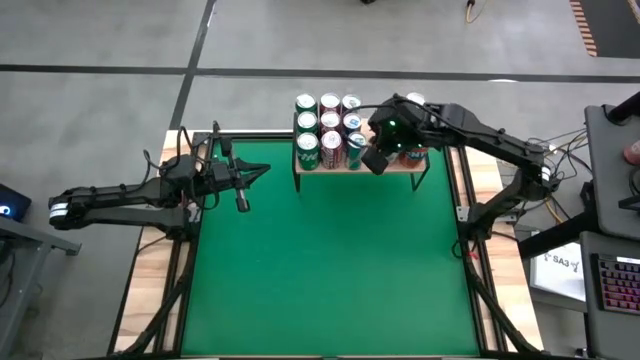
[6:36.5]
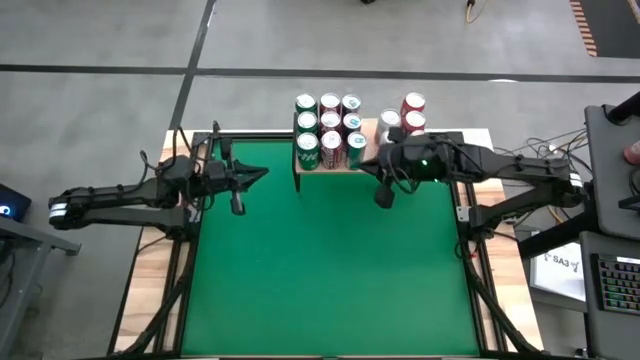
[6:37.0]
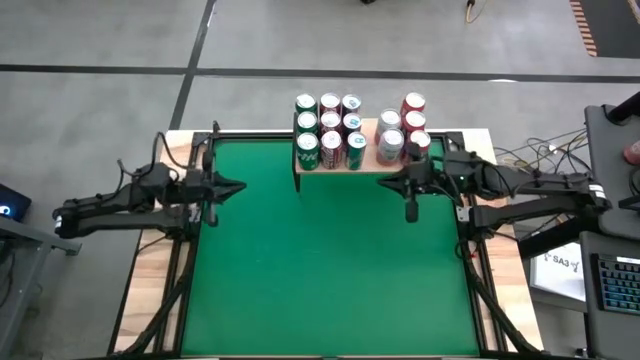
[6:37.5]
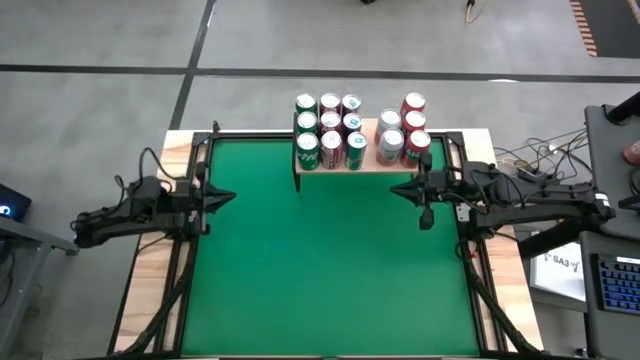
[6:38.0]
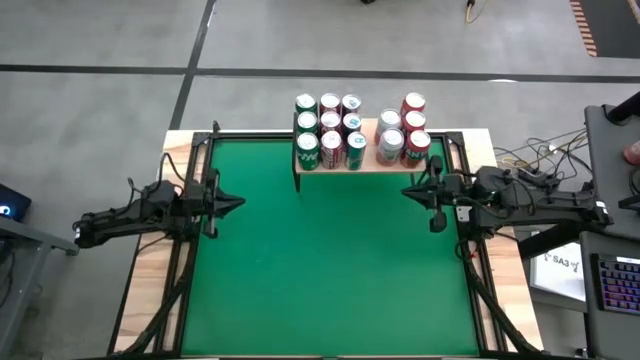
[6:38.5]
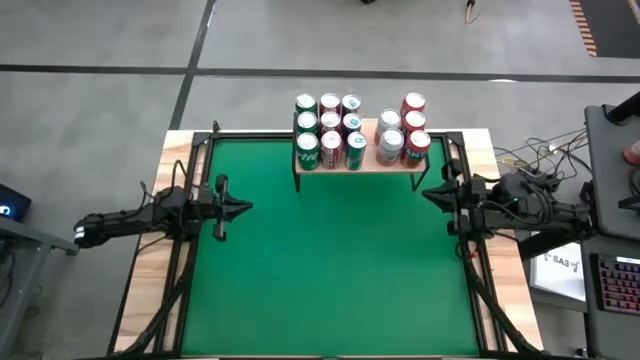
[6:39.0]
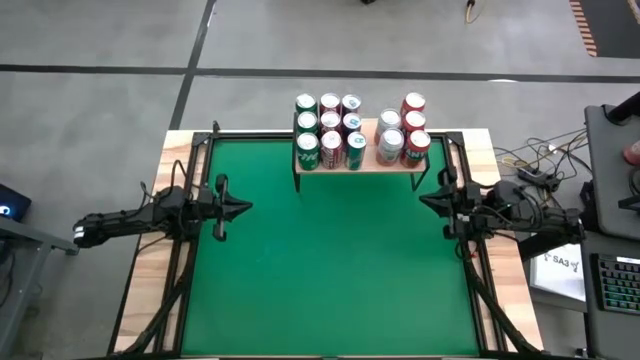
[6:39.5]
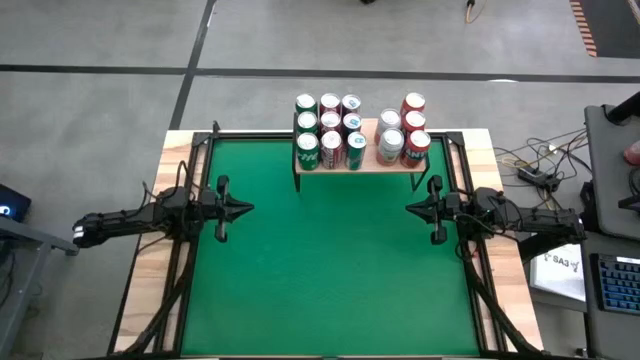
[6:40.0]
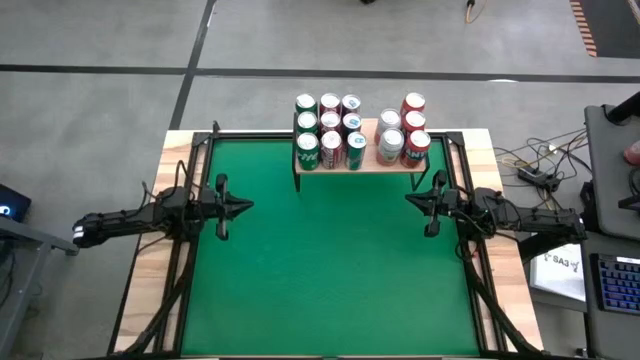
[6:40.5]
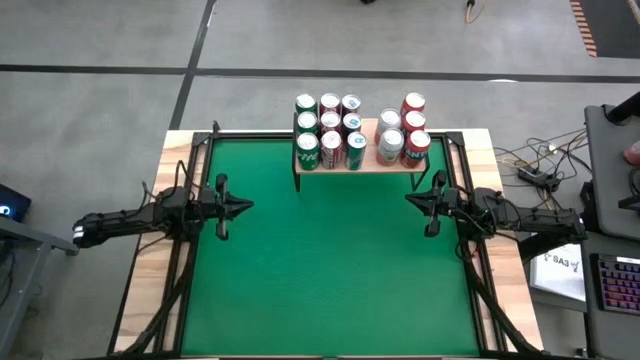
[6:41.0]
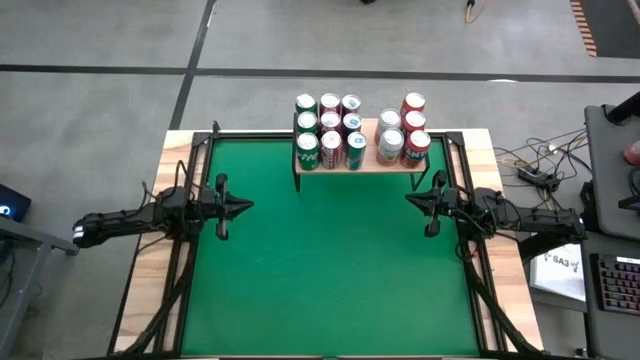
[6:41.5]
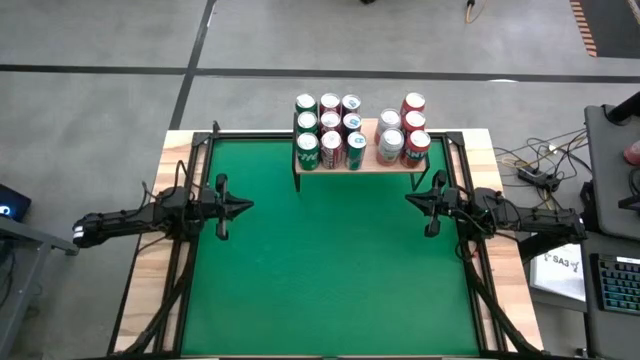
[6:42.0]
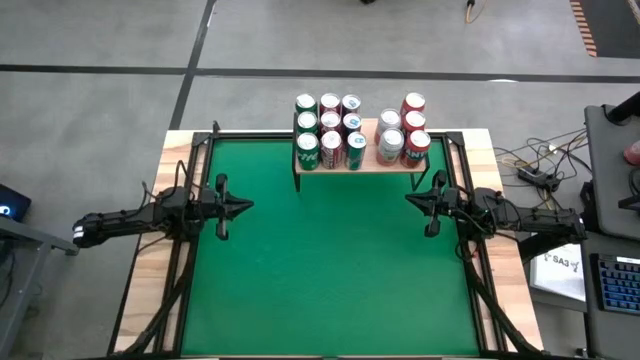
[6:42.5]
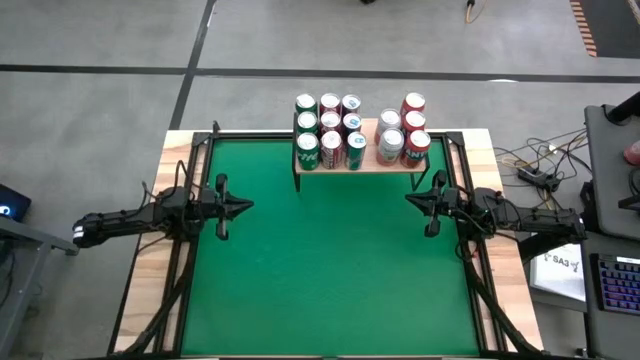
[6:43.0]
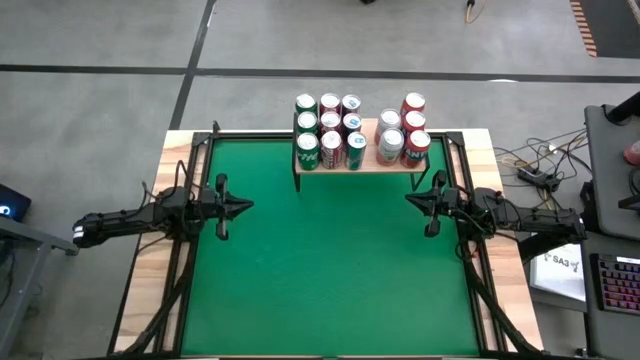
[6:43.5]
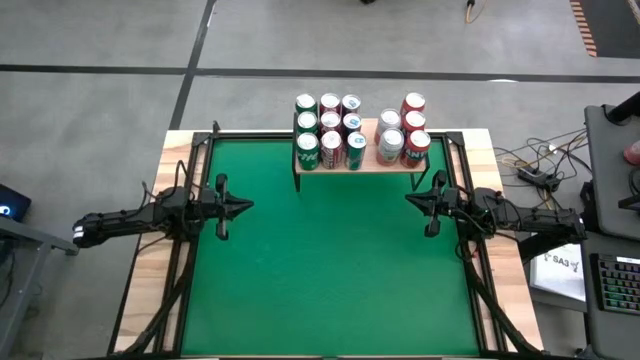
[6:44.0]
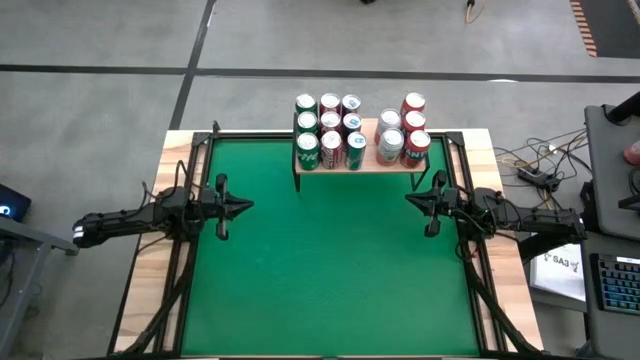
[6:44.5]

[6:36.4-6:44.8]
Task: Place canned beverage on shelf
Return to Home Position

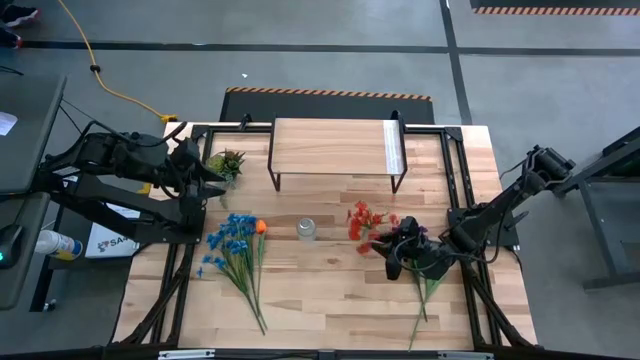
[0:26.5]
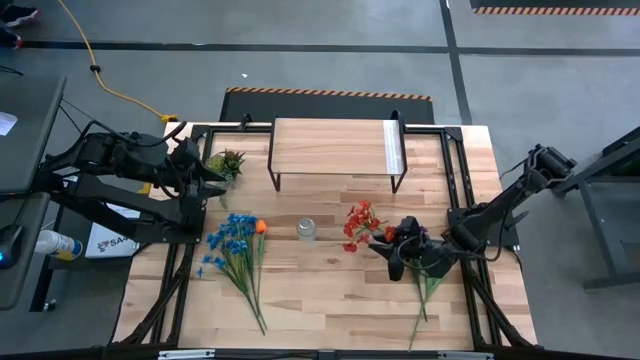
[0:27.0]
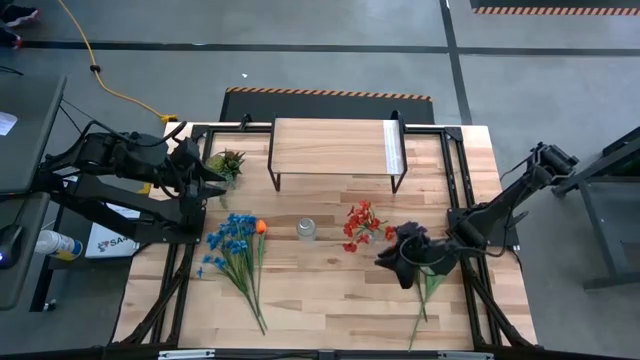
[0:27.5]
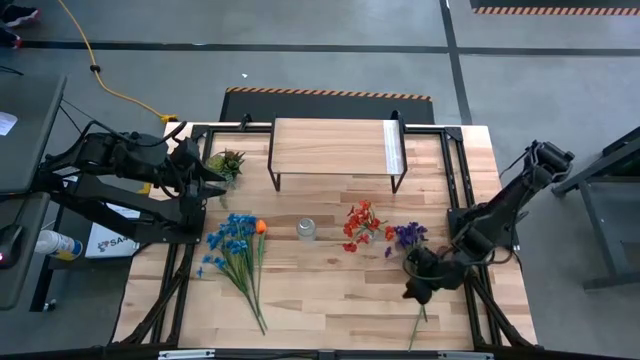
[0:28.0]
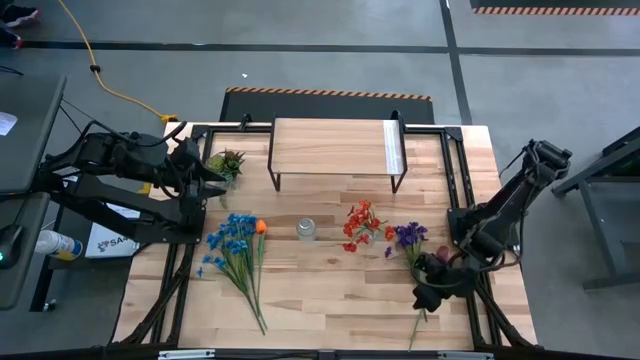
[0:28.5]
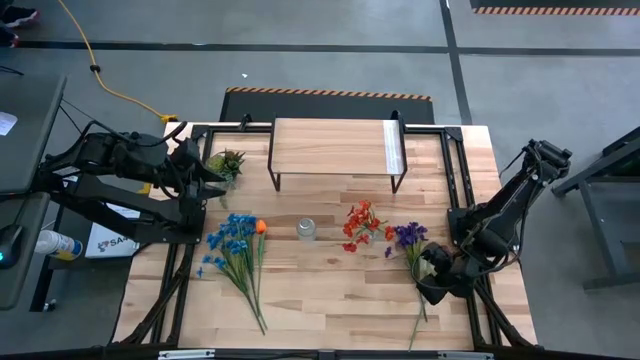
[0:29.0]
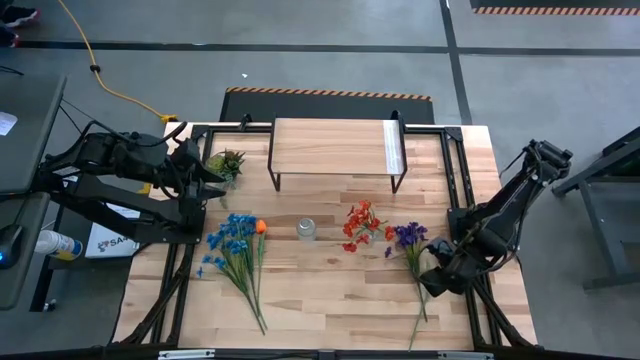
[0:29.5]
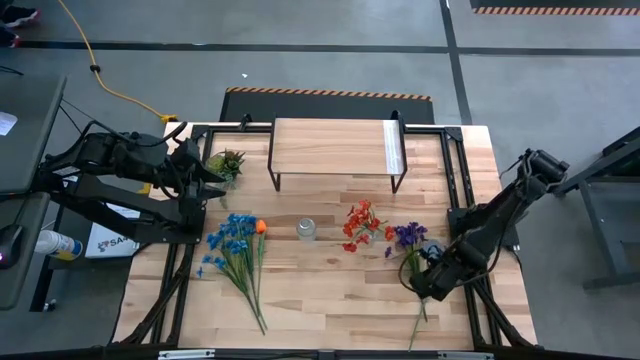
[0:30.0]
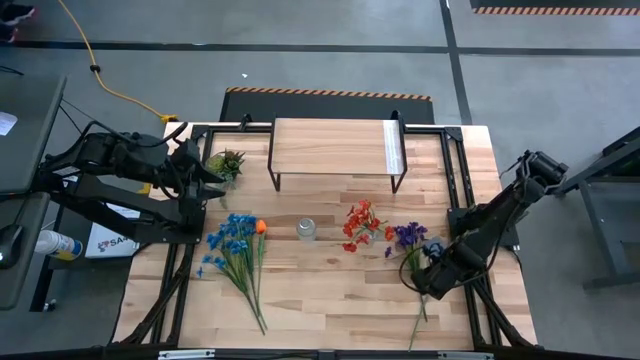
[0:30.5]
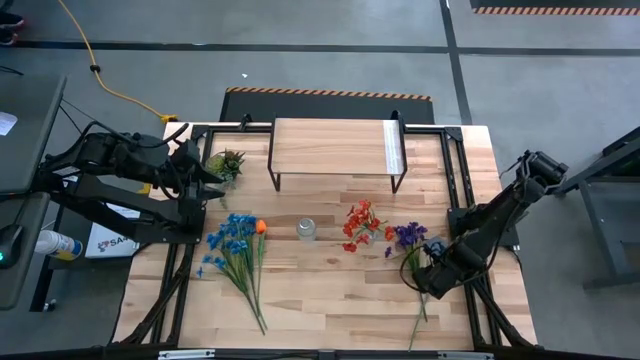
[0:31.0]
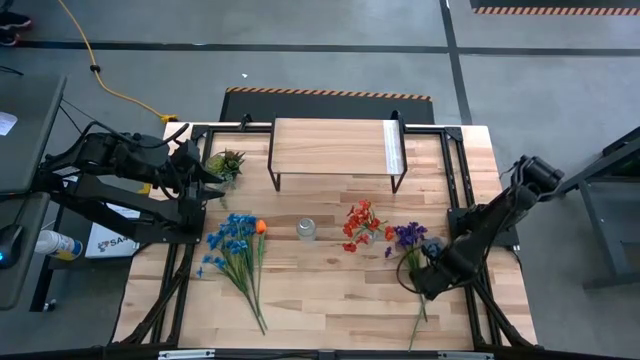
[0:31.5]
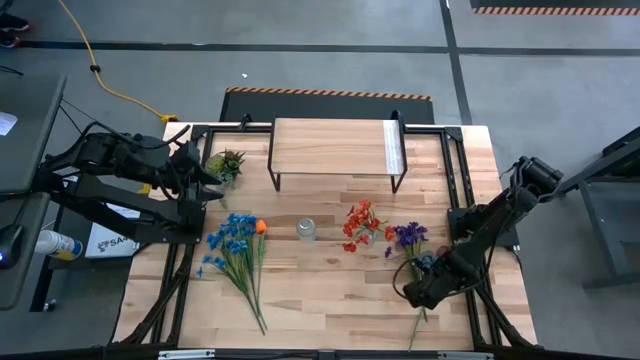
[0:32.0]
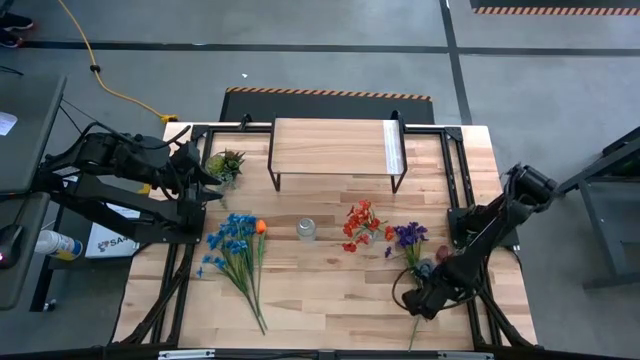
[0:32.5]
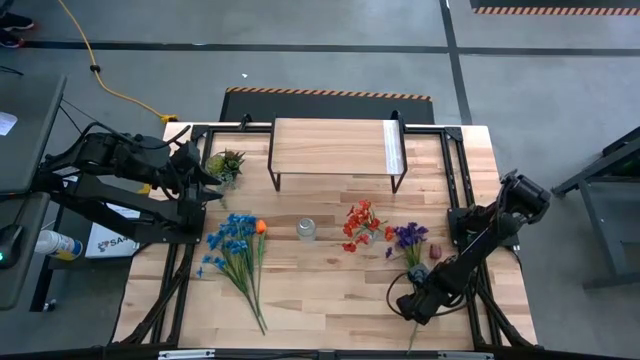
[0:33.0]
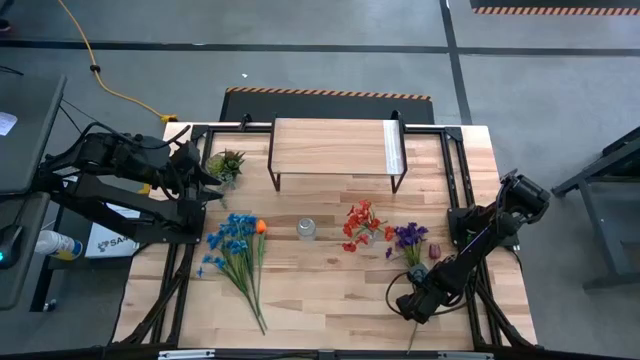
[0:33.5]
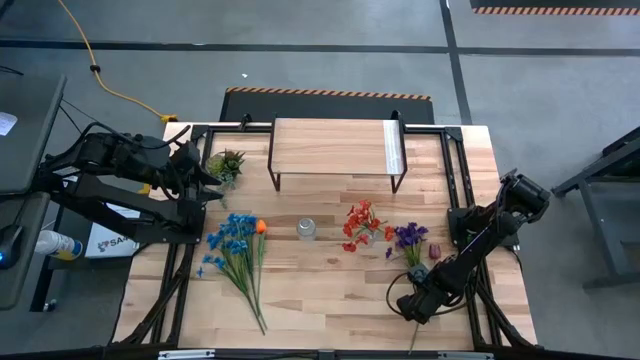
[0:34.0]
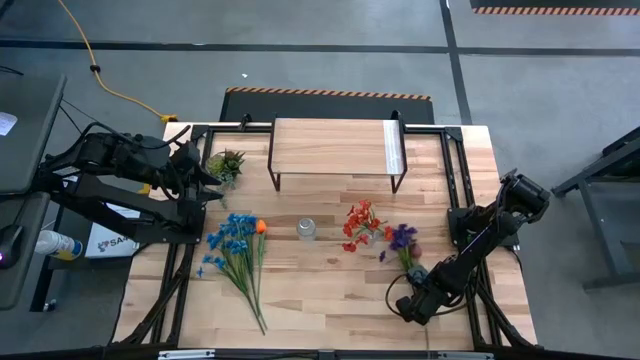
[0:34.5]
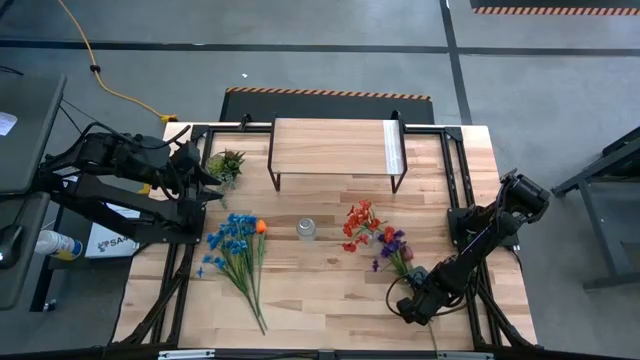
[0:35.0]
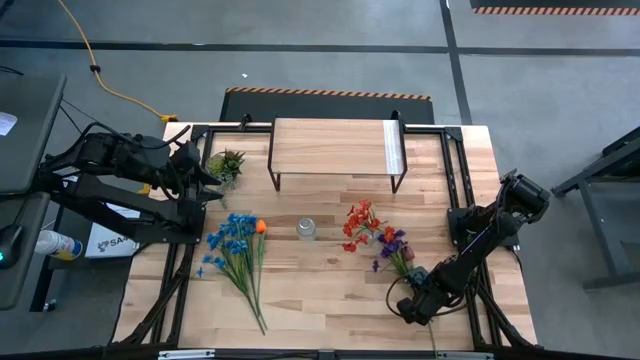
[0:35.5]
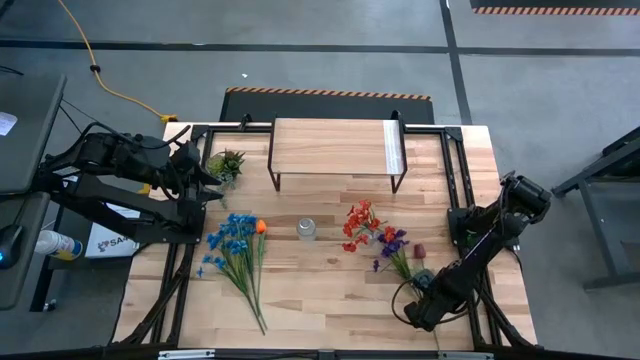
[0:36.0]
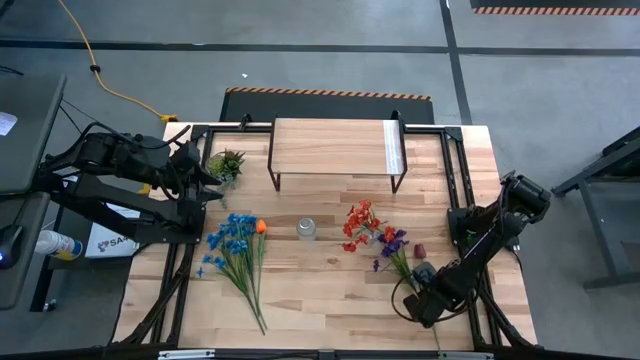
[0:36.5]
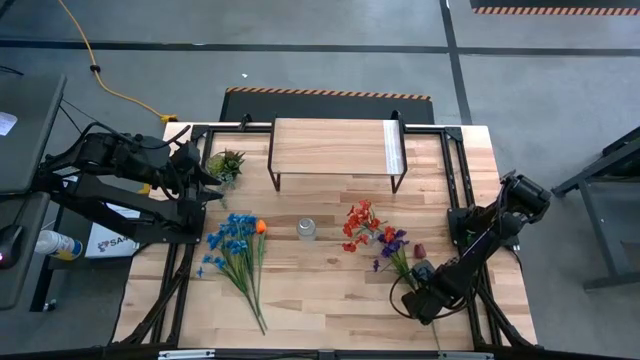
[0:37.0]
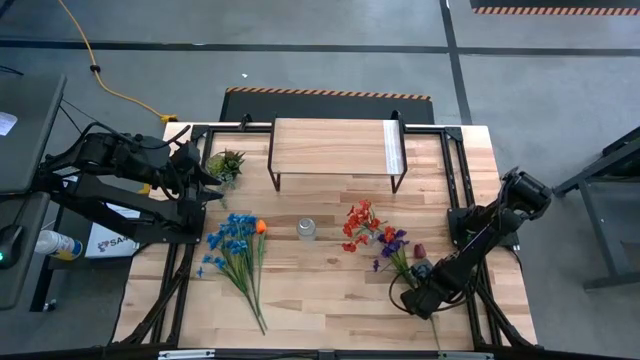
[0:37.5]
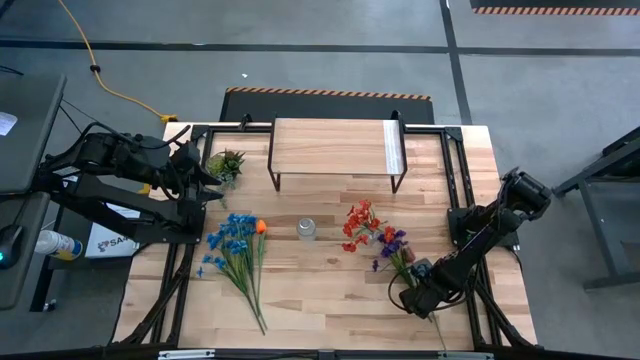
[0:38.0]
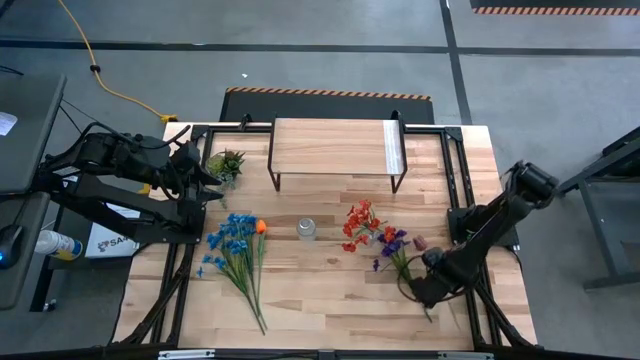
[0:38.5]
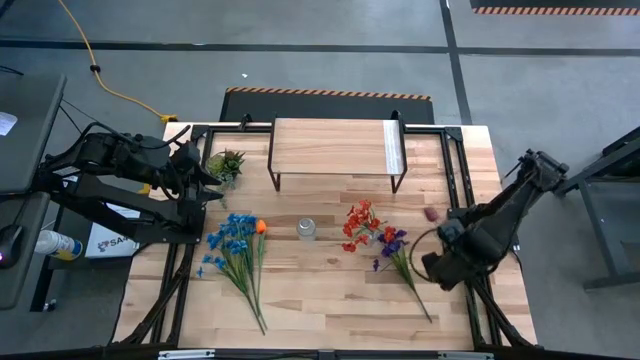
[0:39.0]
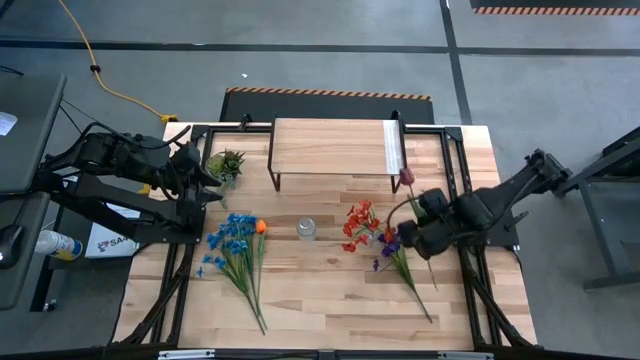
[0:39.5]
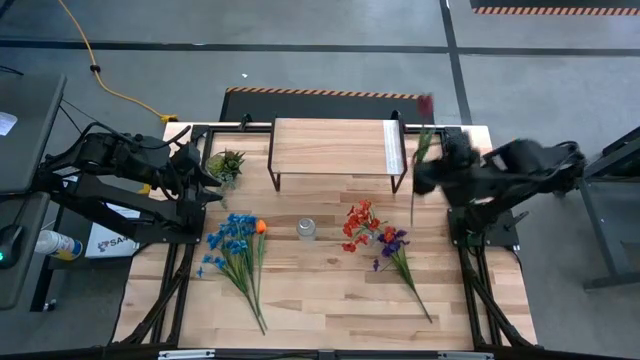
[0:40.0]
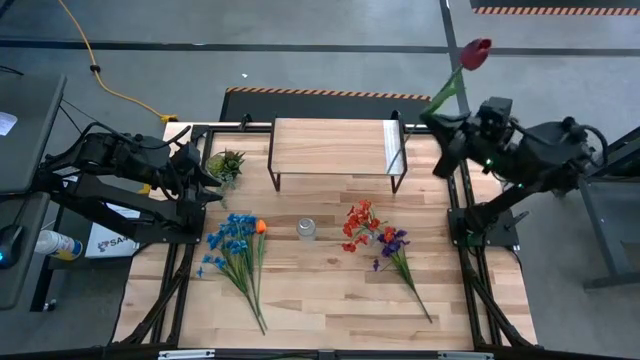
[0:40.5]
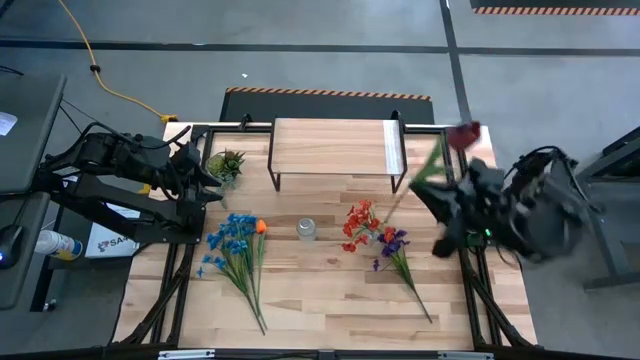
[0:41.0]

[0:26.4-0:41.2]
Task: Pick and place flowers into a vace then onto a shelf
Put the dark red flower into the right transparent flower vase
